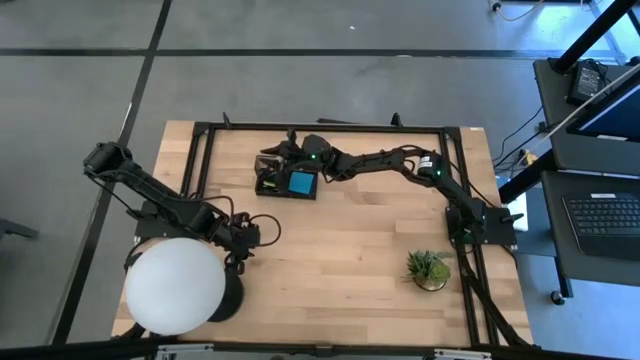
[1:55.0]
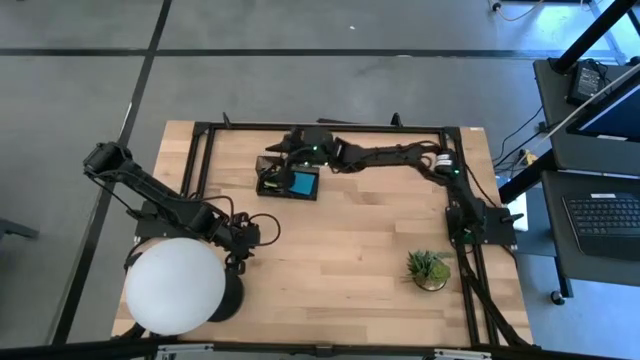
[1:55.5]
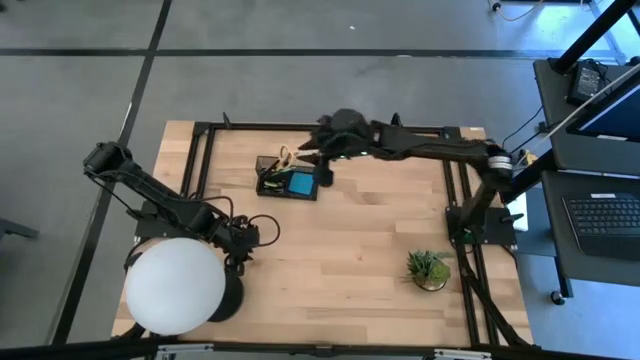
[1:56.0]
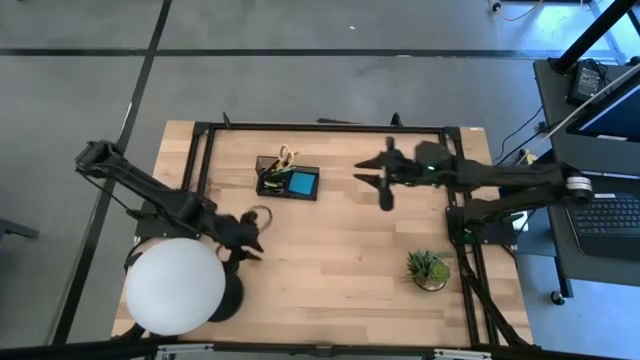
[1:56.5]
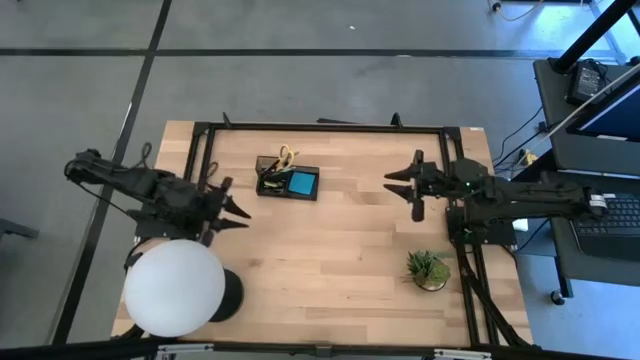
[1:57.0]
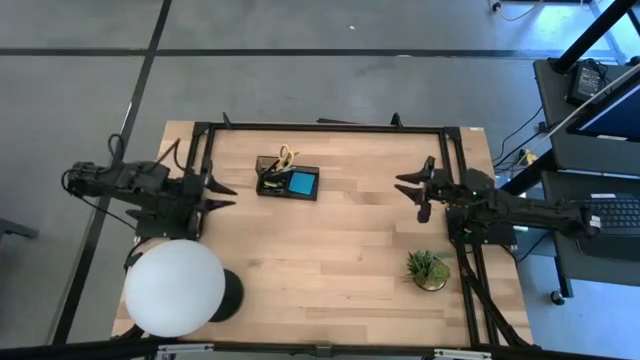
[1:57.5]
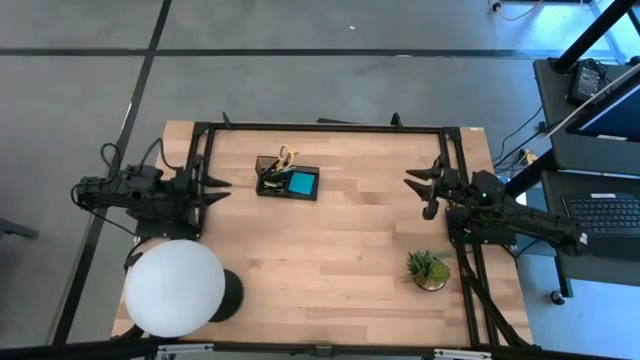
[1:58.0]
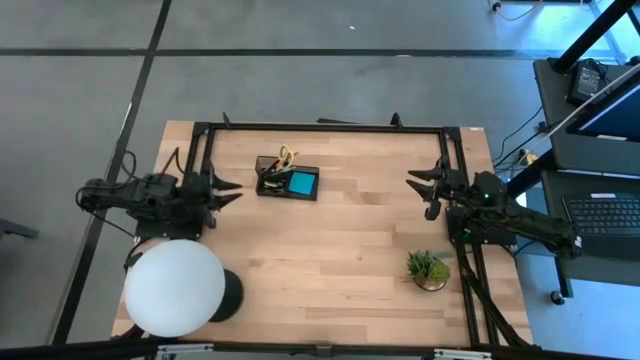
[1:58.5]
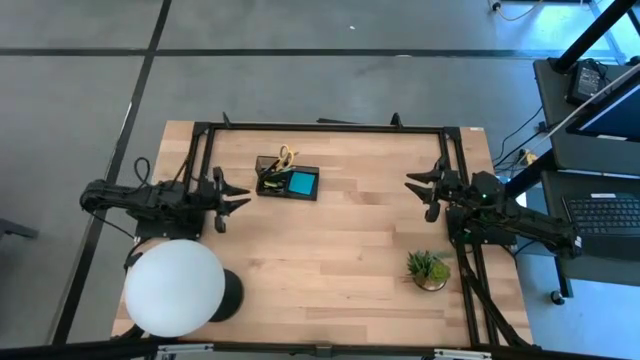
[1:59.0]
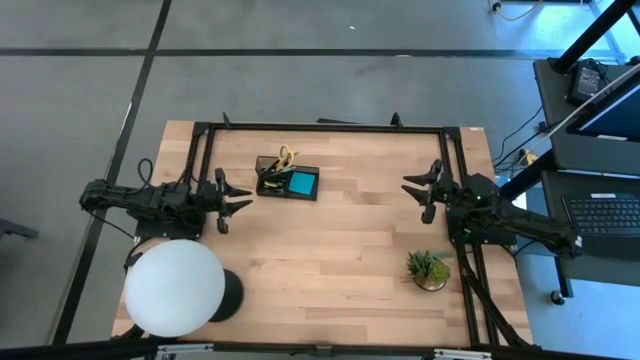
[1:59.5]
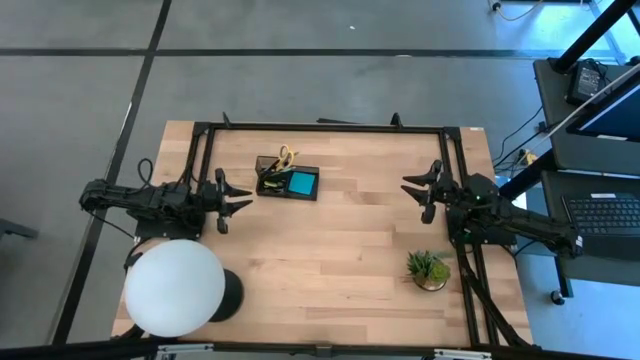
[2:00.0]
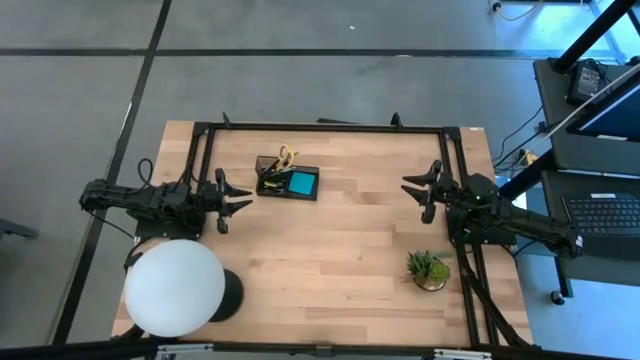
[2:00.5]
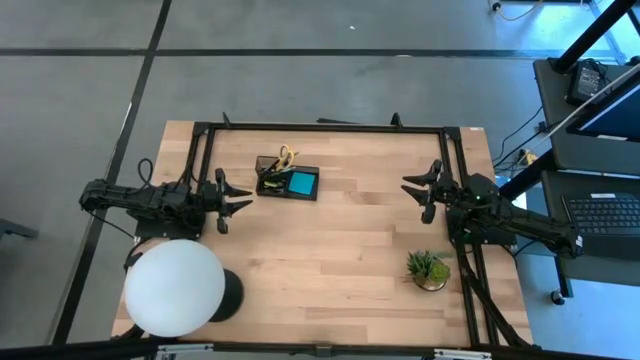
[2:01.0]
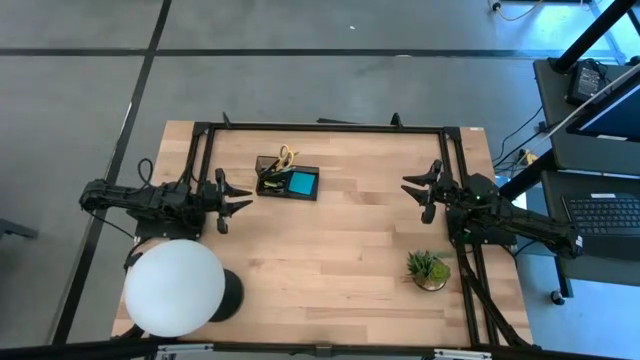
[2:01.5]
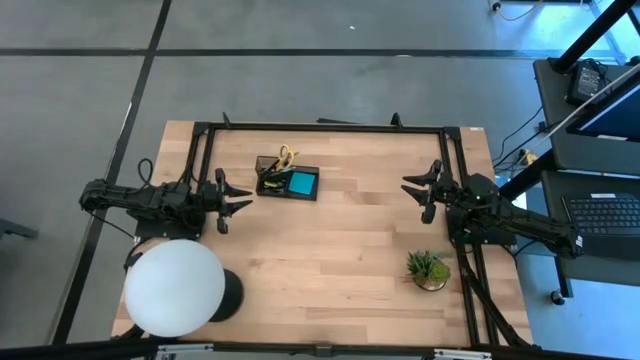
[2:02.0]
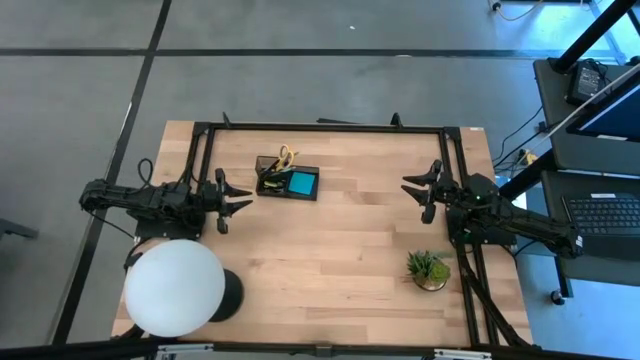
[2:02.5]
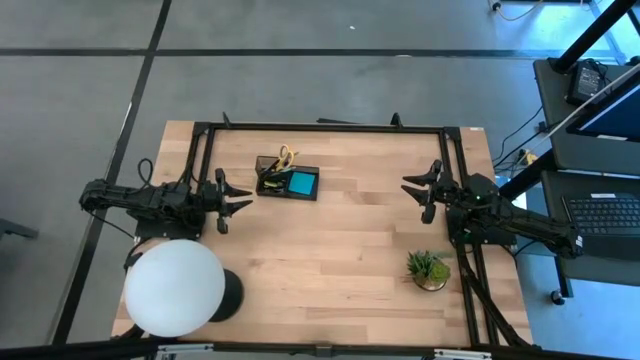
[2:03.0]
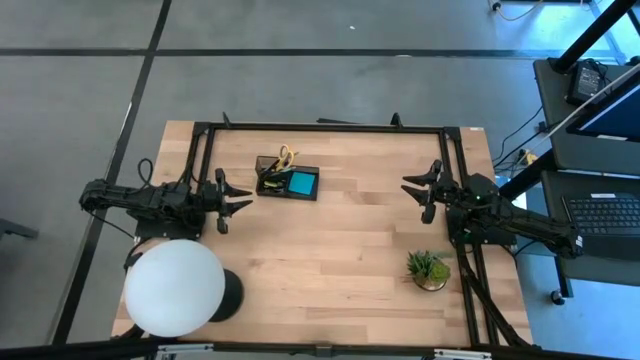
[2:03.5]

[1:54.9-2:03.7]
Task: Pick and place office supplies into organizer
Return to Home Position

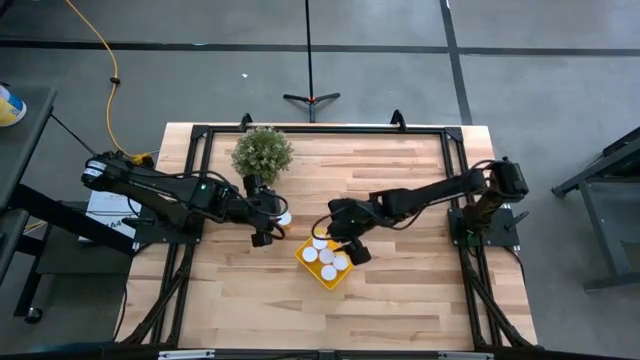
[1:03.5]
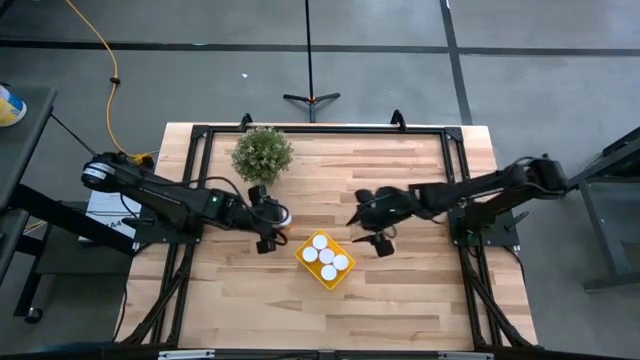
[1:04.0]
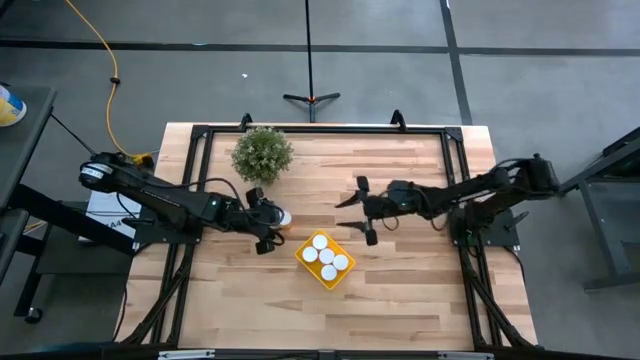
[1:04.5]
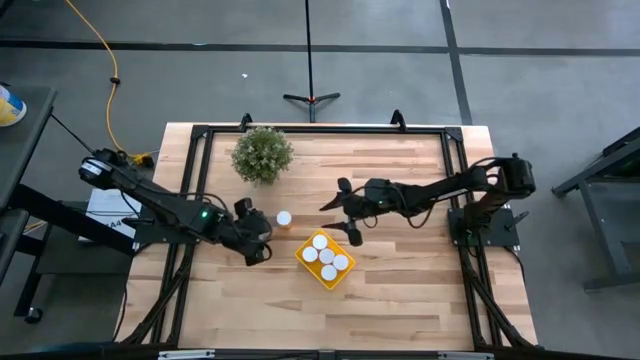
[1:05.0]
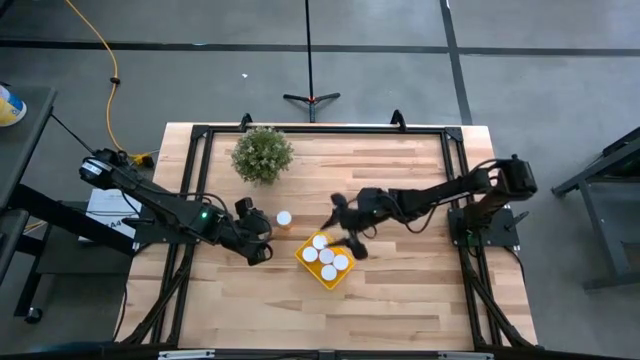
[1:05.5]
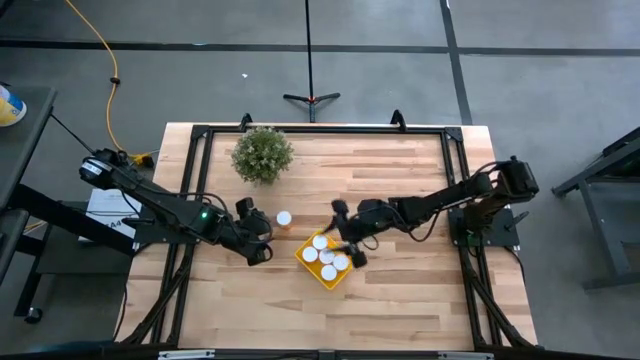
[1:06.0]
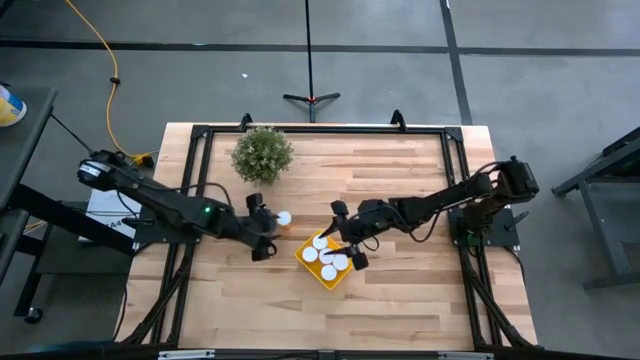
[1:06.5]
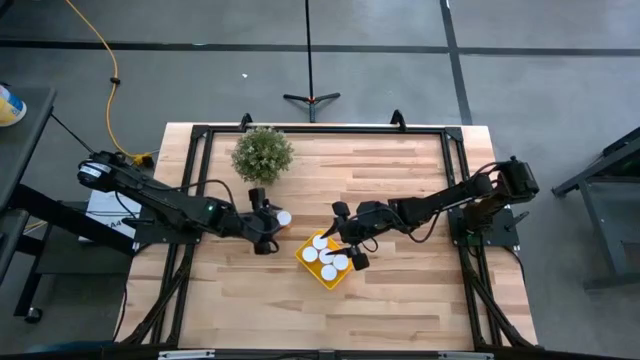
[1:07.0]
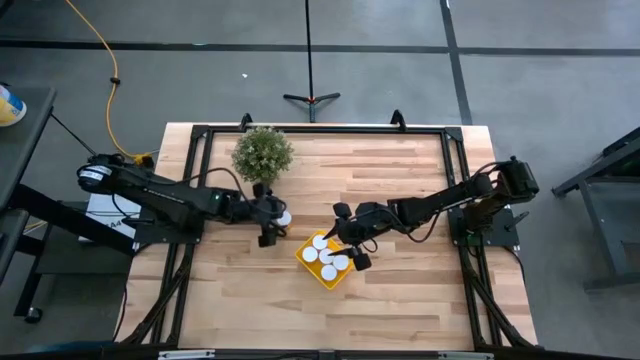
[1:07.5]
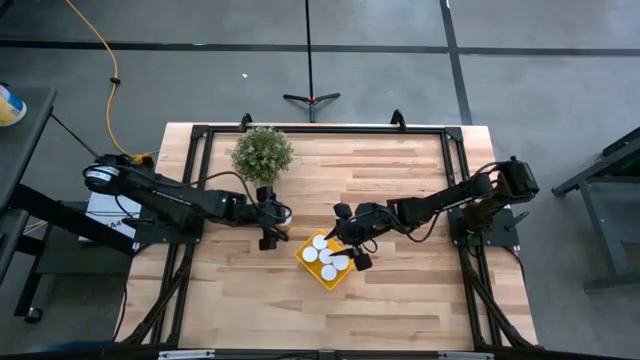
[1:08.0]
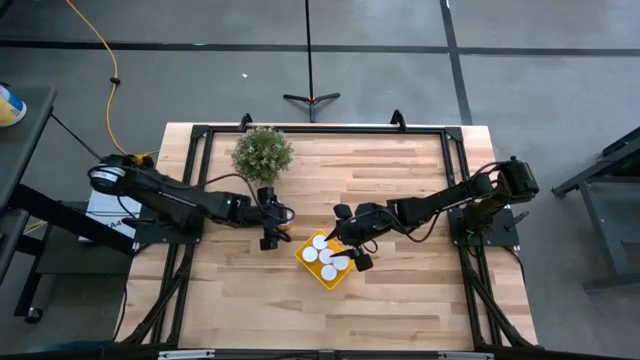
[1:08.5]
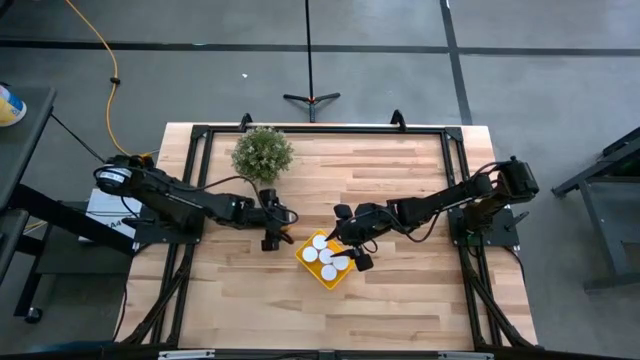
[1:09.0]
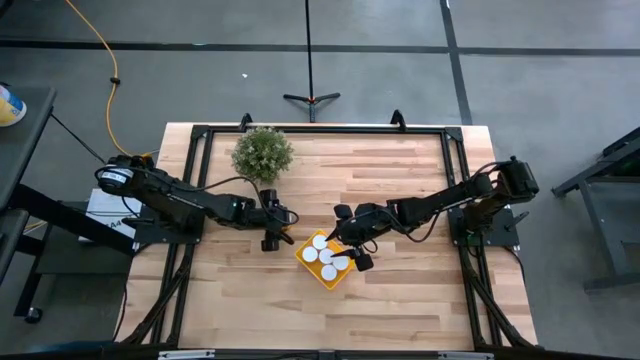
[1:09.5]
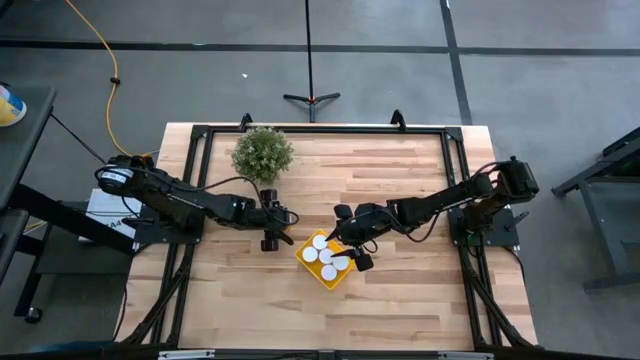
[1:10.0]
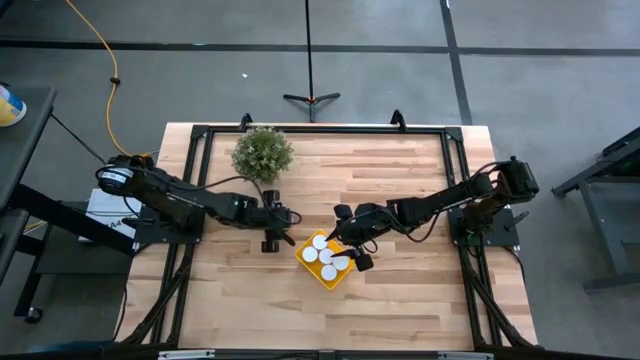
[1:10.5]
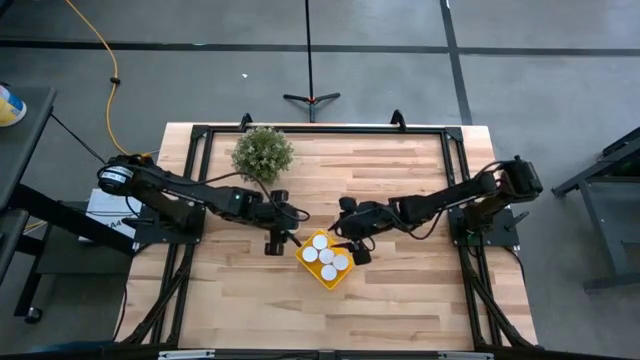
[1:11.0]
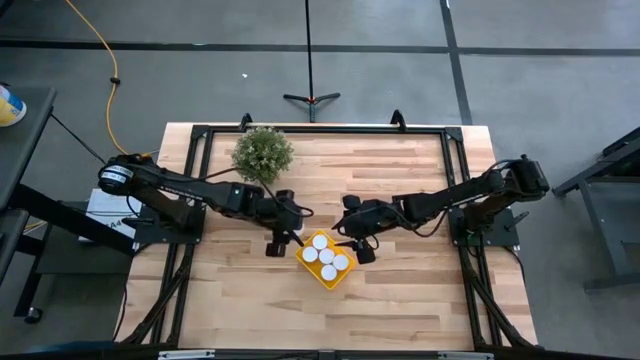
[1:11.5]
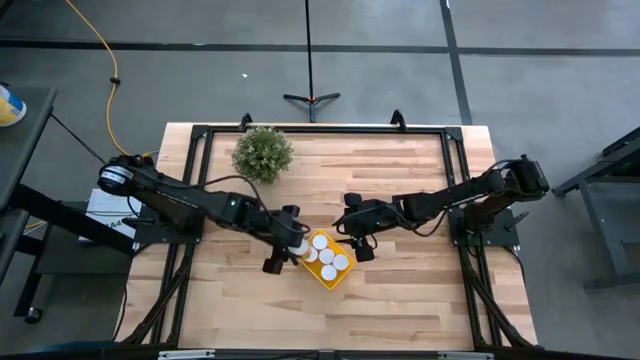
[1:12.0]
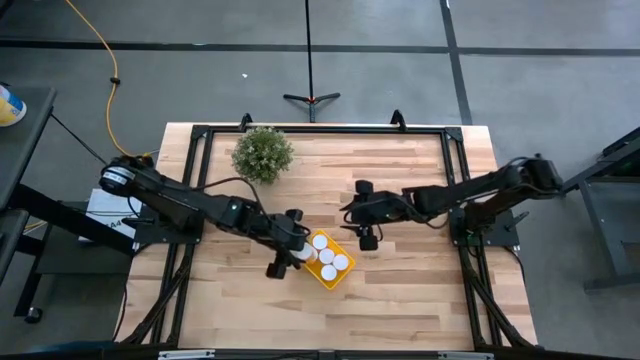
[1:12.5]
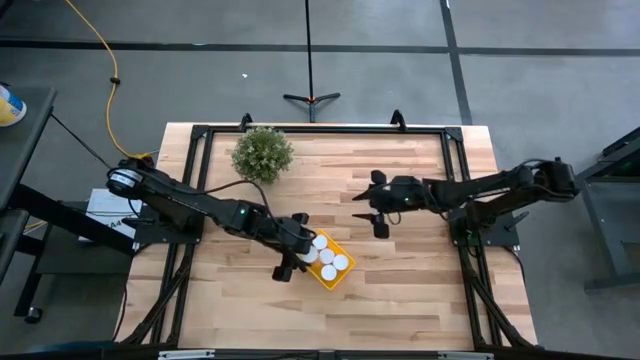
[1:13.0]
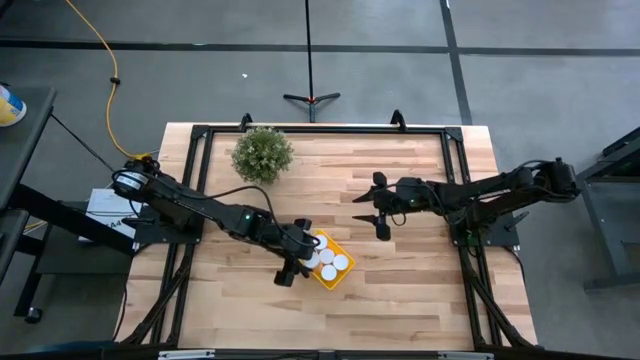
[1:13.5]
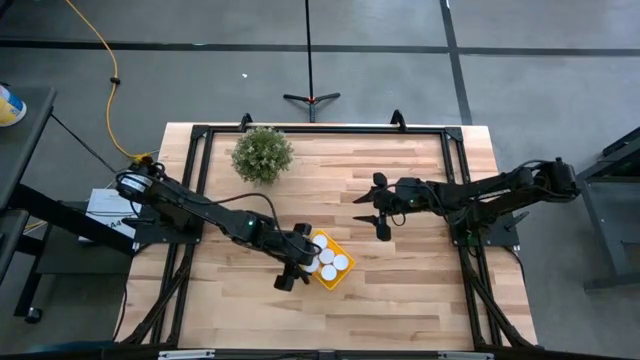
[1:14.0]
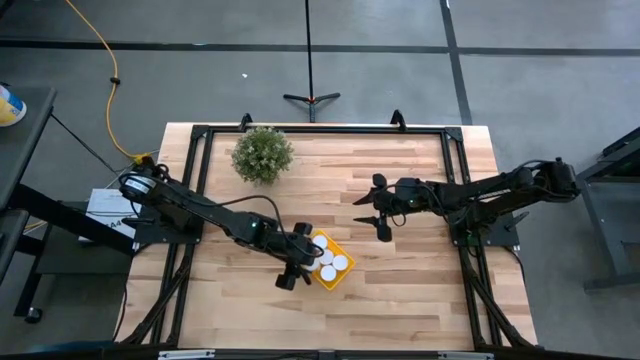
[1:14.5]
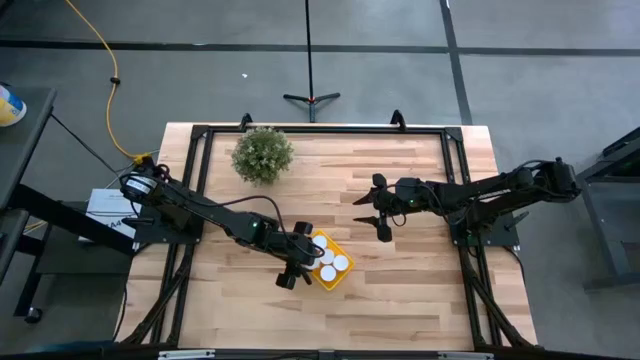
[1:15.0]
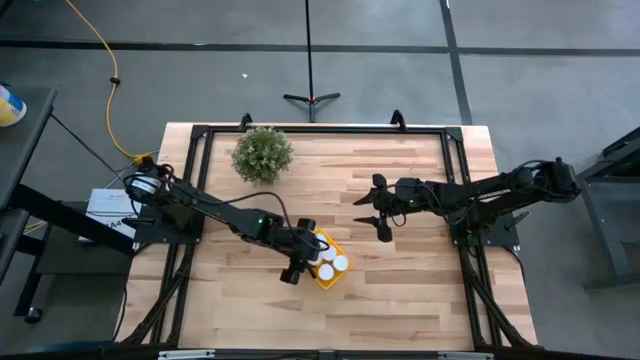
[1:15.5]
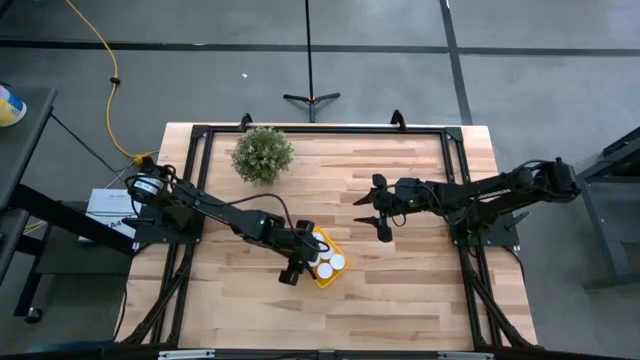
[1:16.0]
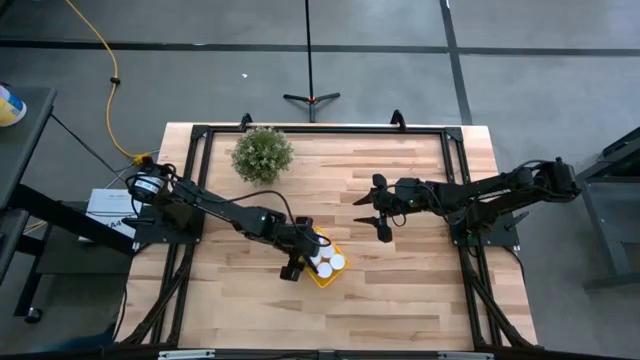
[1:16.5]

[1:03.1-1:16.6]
Task: Pick and place pill bottles into a basket
Put the pill bottle into the yellow transparent bin
